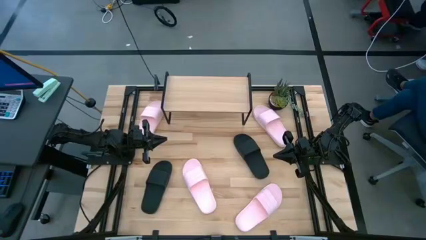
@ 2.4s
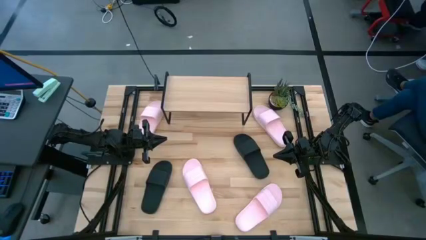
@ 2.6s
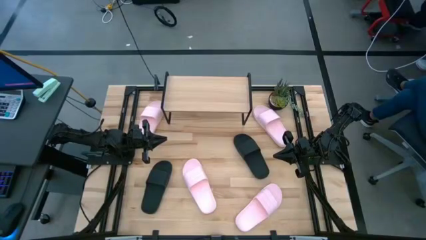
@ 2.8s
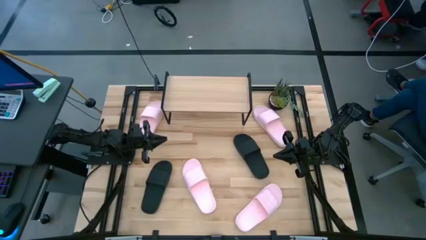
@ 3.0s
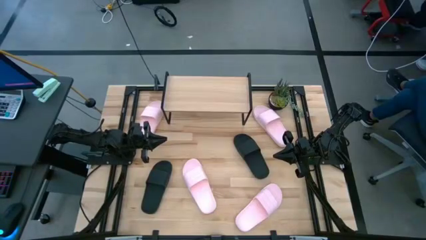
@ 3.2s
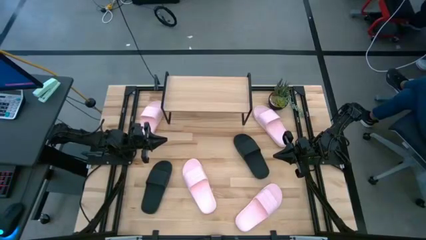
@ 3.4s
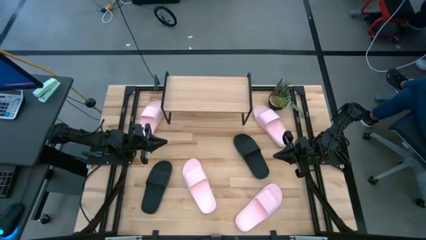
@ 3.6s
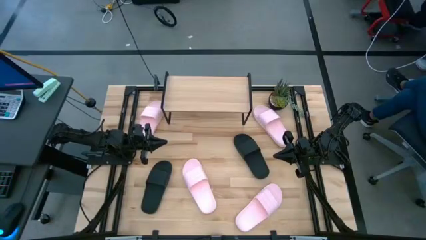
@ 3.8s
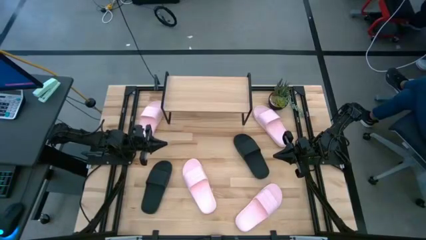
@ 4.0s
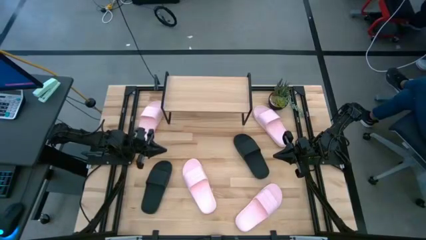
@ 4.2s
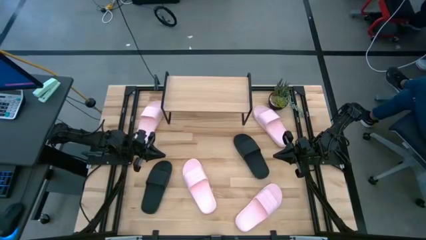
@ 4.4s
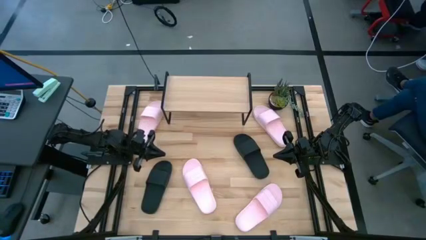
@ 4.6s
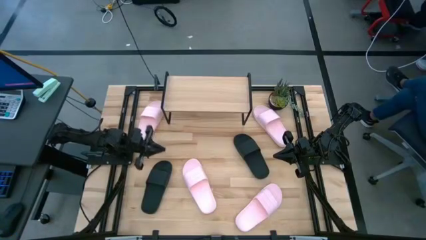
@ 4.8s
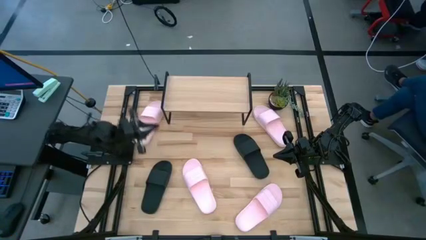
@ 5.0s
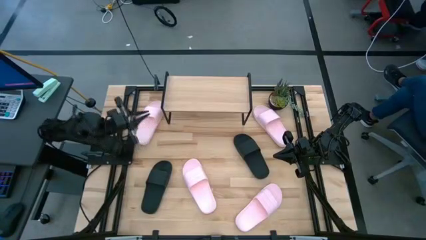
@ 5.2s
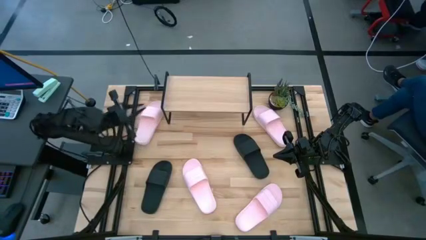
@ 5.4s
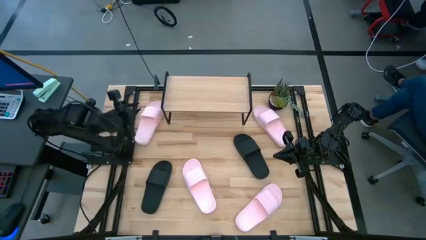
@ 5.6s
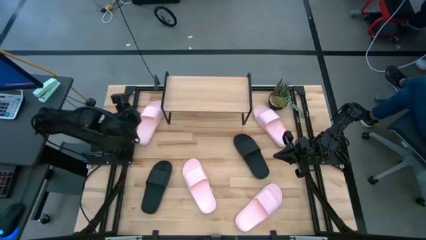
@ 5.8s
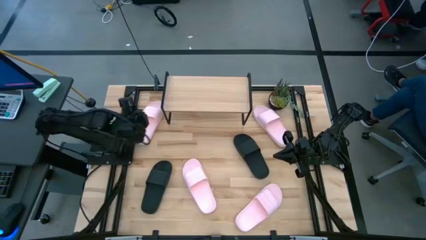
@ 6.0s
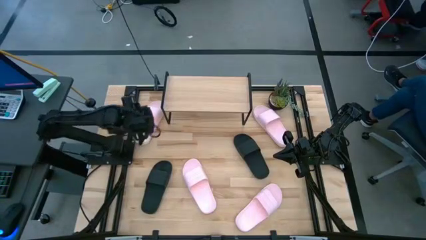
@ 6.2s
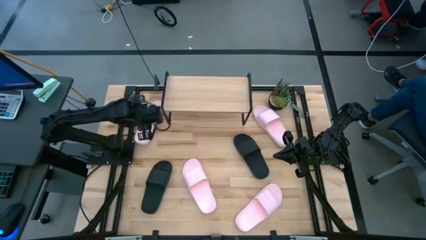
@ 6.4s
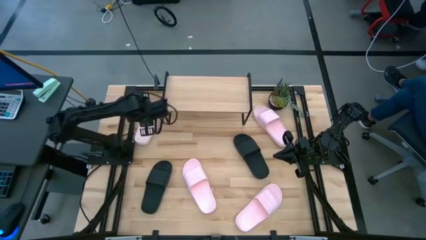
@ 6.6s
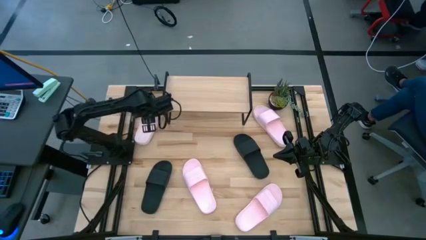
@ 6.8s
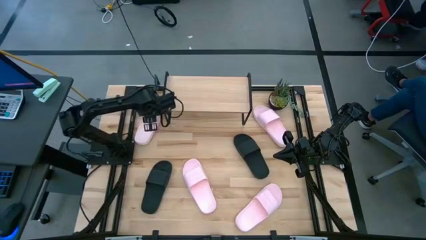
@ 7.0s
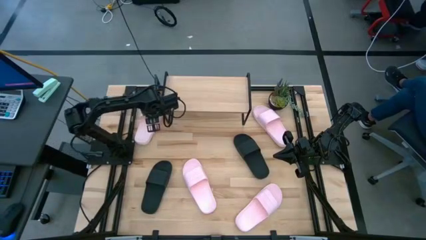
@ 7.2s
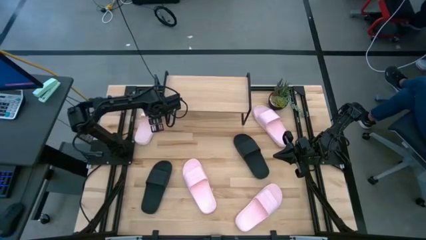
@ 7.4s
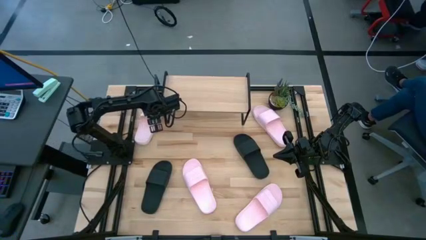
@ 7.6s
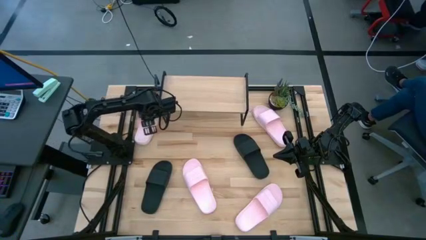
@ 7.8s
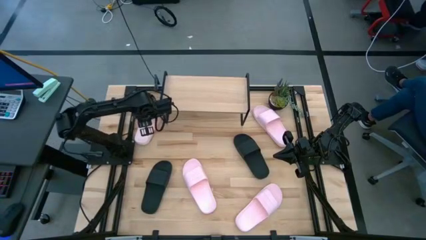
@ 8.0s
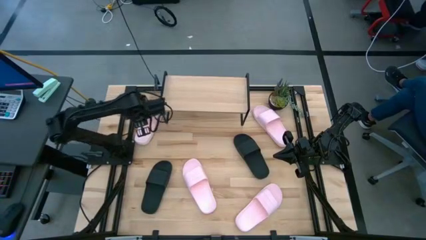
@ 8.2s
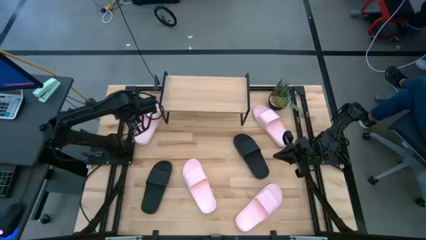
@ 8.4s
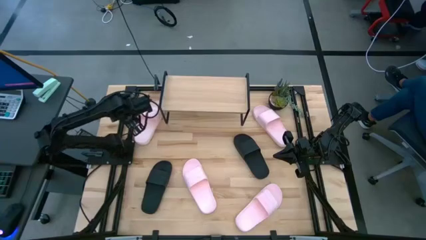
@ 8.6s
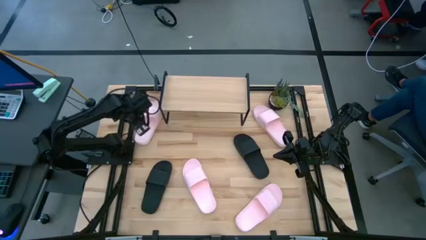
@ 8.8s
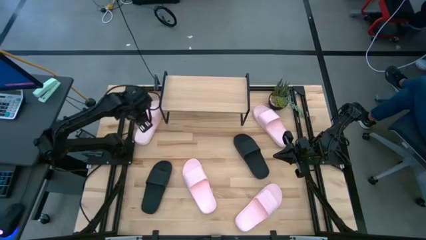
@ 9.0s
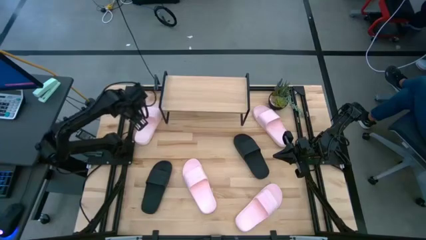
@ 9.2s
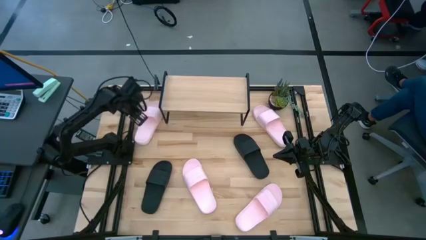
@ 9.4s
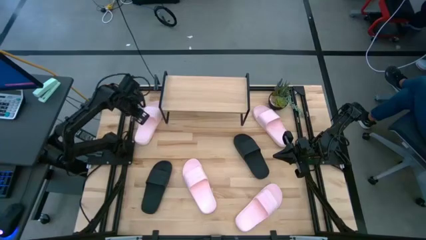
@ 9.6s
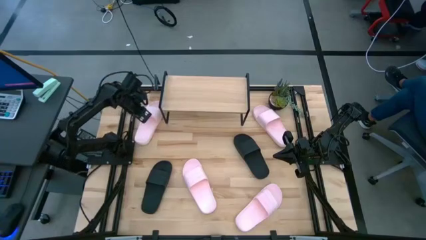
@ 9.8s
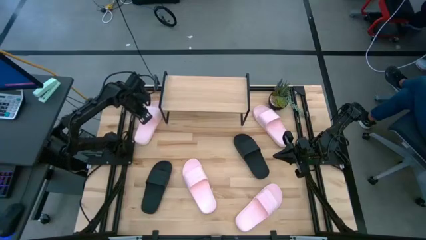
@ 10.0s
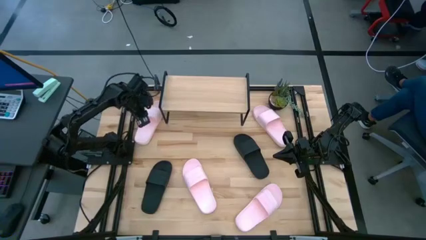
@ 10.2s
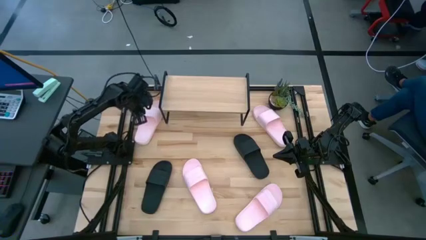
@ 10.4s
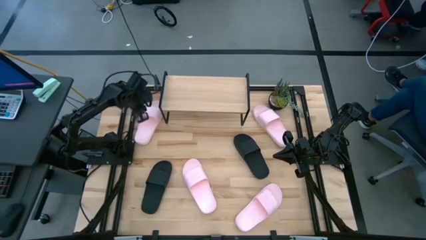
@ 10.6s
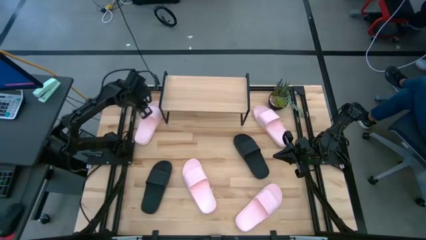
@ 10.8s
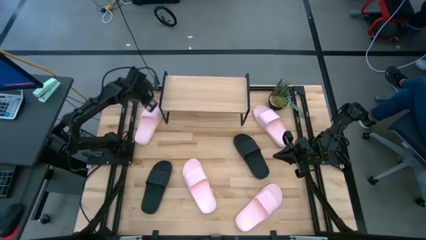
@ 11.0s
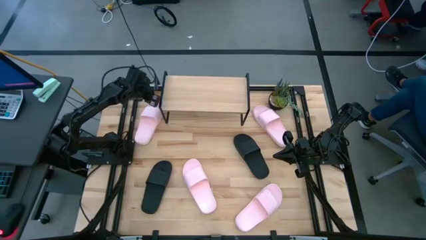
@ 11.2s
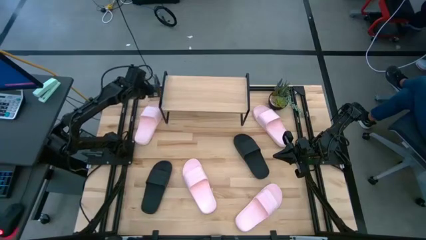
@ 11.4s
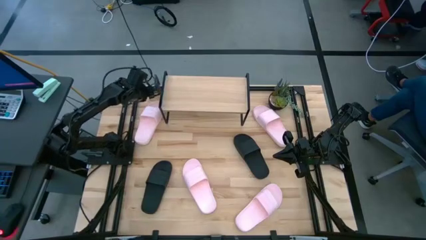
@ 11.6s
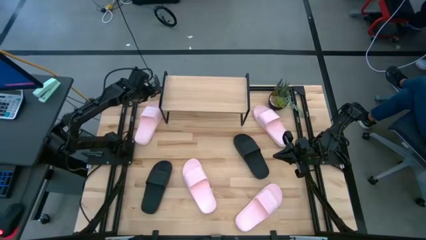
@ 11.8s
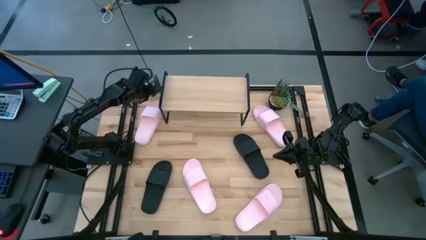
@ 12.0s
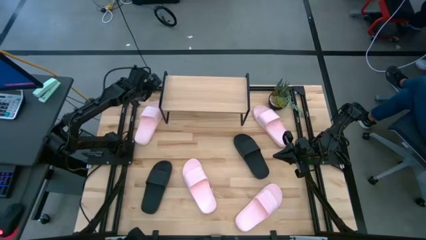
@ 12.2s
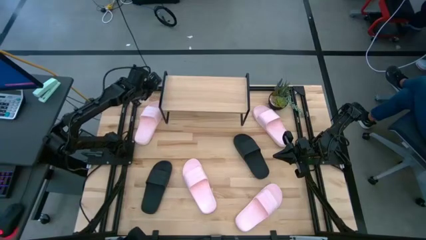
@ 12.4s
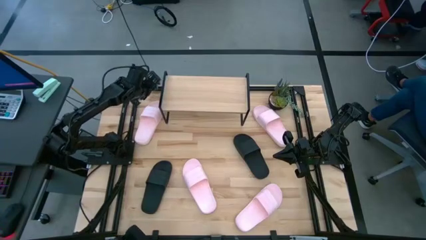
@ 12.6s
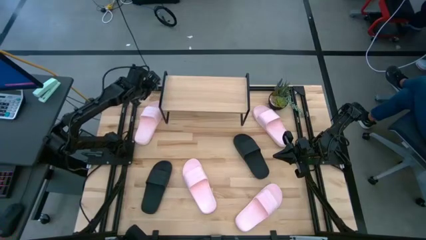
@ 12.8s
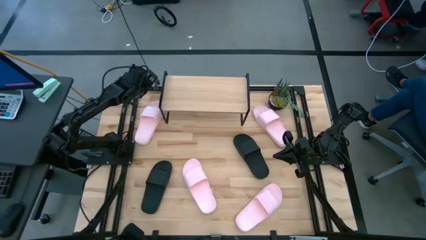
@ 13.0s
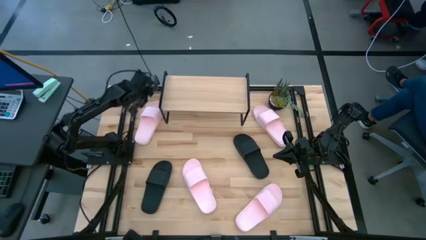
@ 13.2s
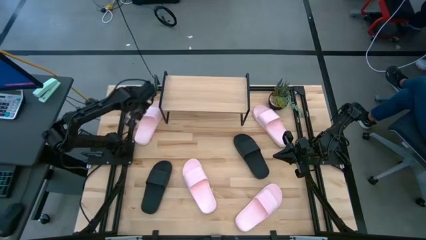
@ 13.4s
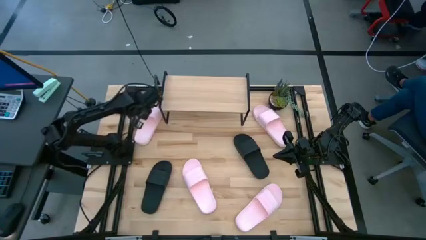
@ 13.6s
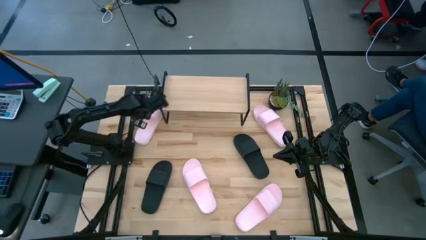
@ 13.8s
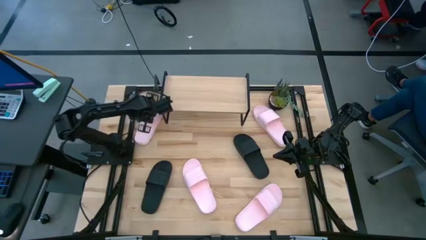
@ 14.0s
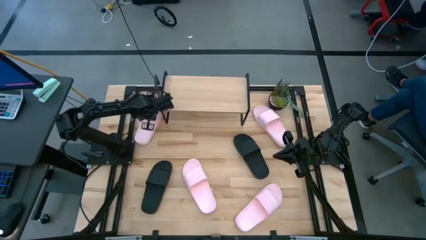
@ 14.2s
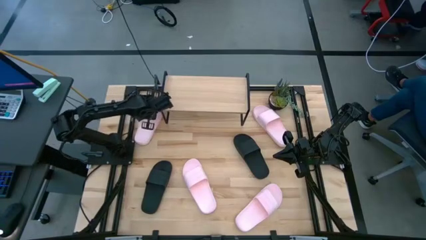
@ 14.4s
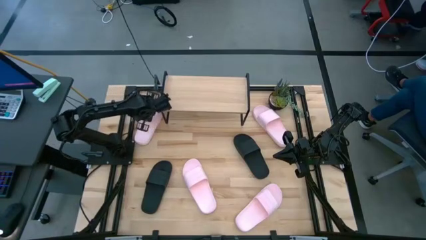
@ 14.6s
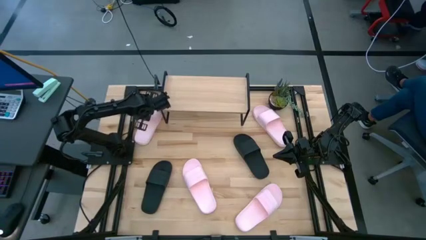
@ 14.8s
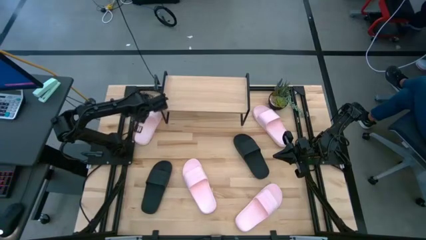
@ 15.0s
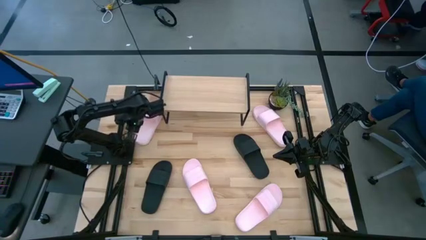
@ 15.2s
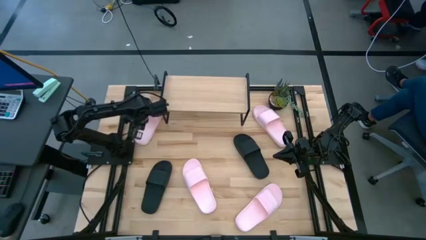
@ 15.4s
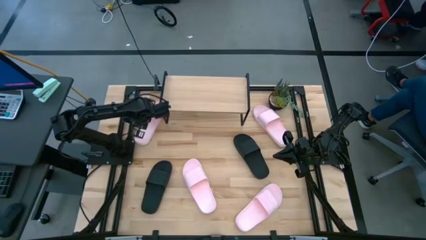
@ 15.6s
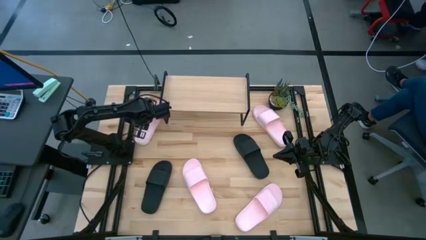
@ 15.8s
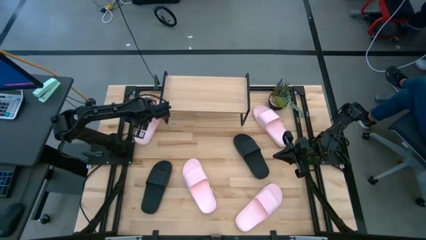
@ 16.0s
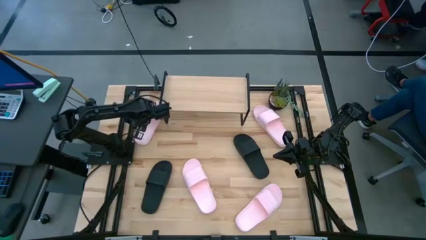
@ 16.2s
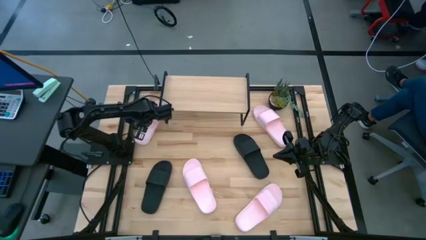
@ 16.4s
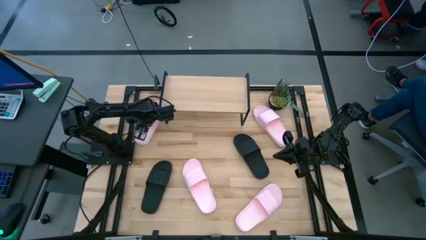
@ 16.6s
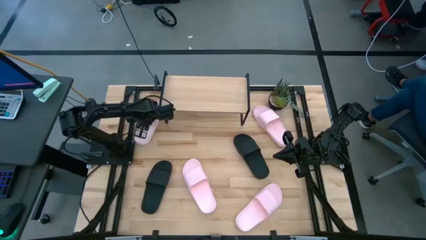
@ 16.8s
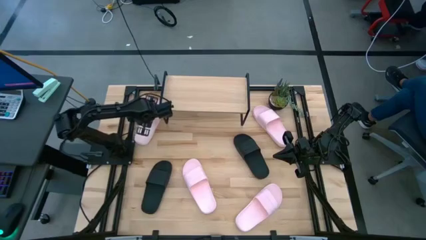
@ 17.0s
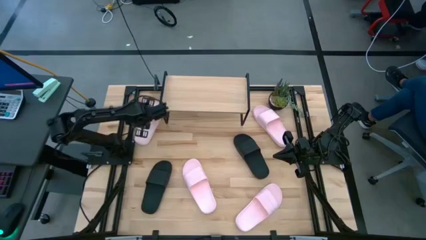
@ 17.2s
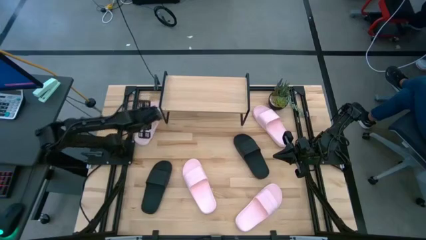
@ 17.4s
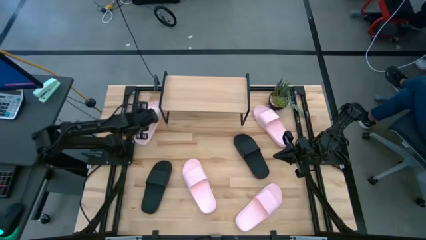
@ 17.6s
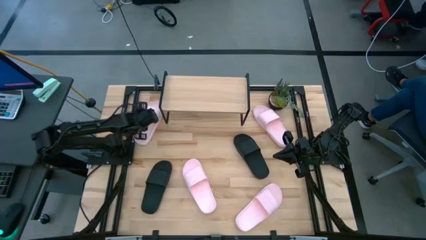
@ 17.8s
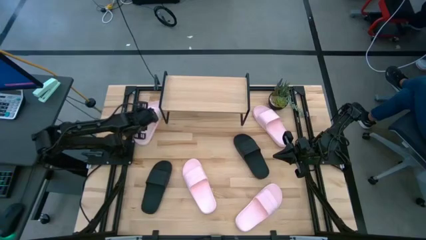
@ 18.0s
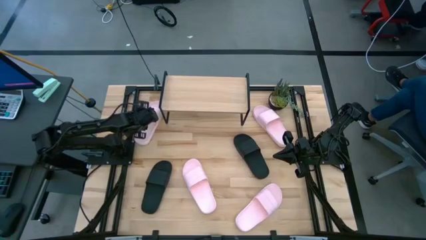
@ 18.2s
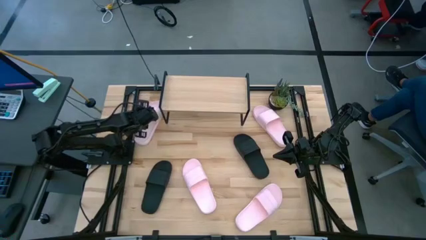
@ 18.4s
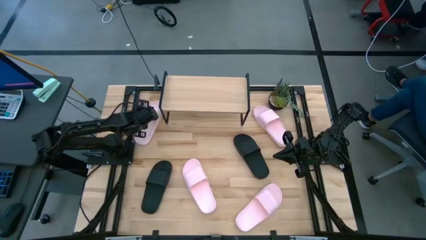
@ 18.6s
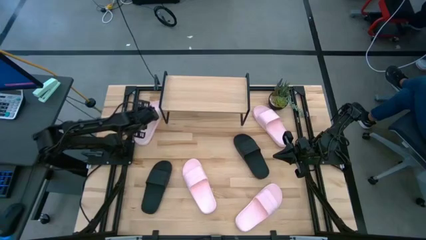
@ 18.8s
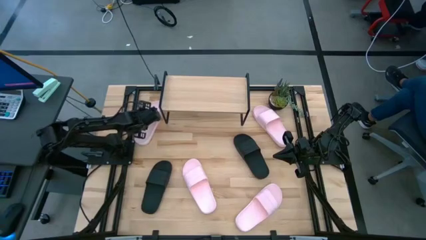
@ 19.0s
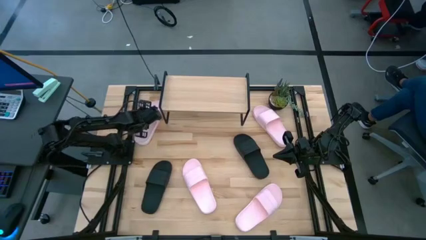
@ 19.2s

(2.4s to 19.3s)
Task: Pick and place slides into the shelf
Put the top left pink slide on the shelf
